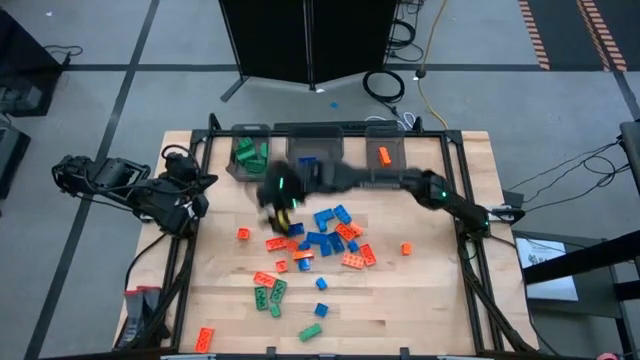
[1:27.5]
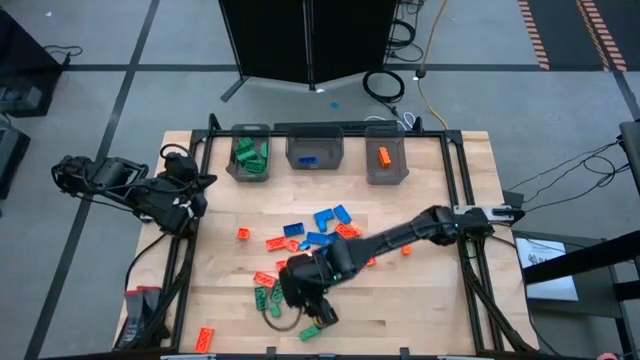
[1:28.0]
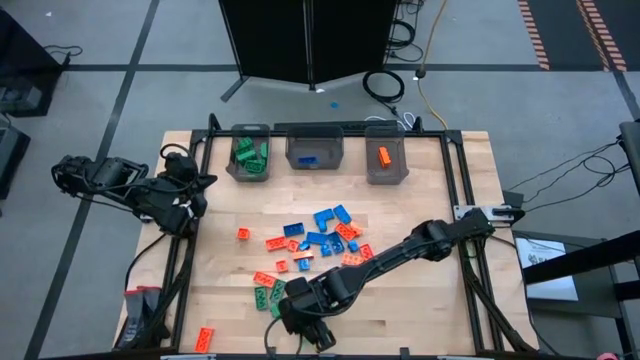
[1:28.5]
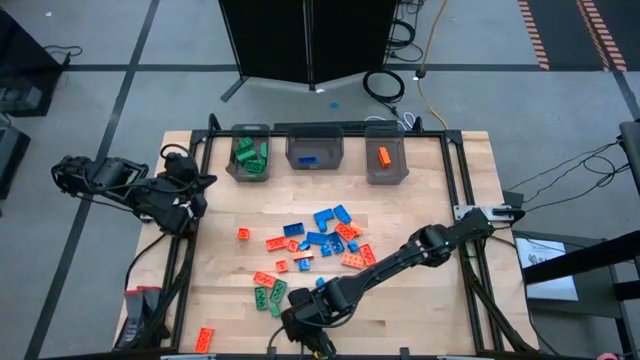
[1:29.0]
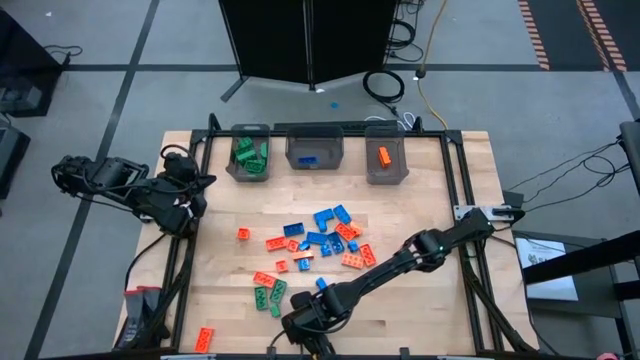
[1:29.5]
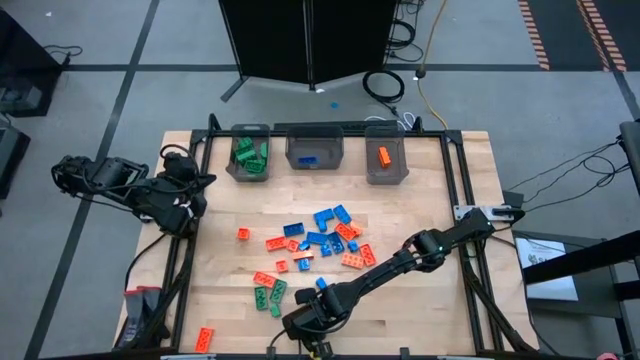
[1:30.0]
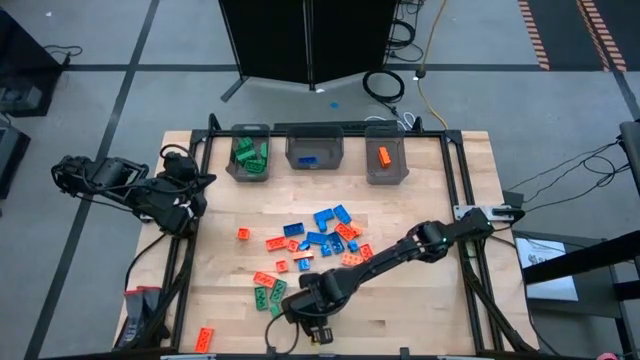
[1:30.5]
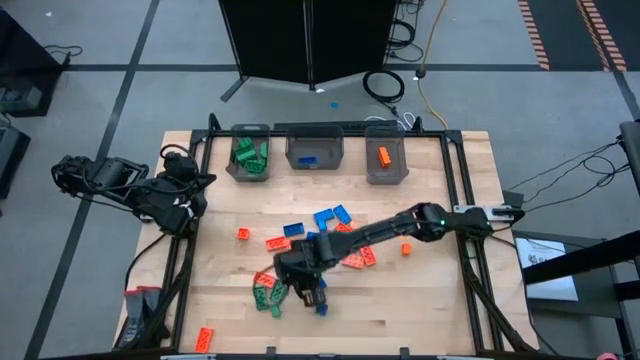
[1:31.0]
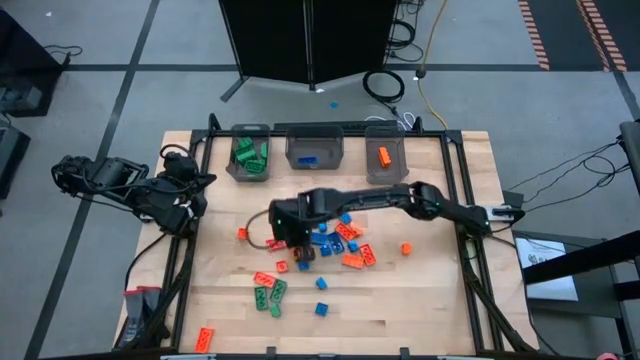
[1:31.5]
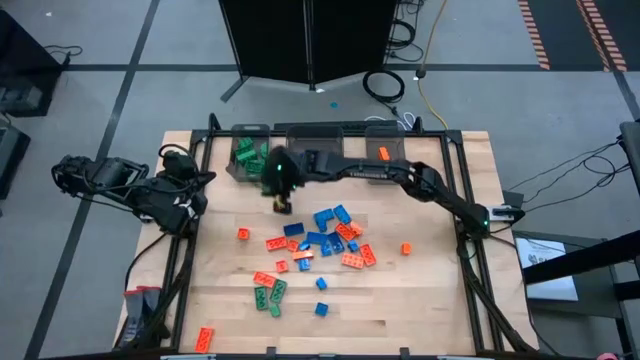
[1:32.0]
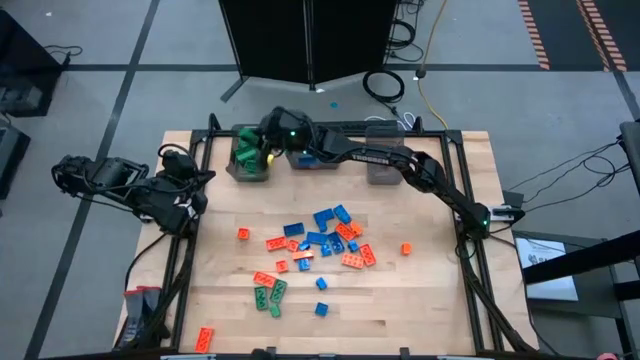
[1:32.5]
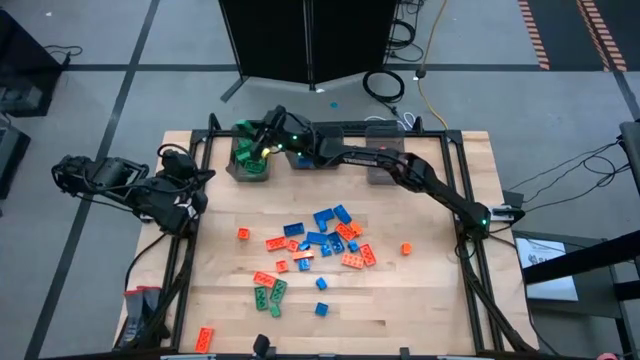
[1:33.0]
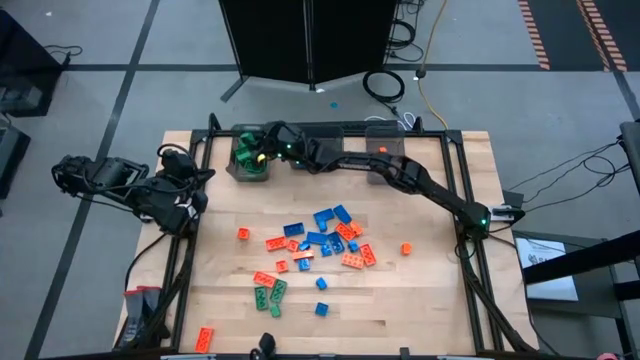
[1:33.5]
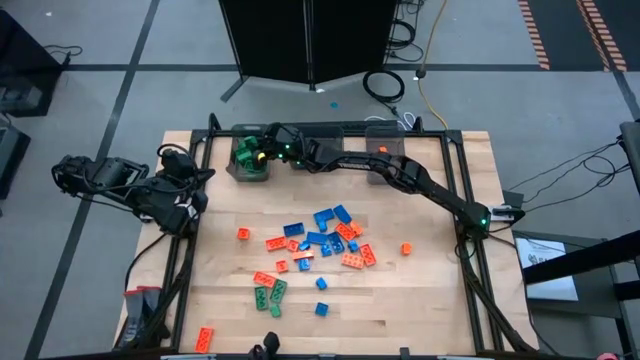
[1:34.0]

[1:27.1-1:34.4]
Task: Sort blocks
Put the green game piece into the left black bin

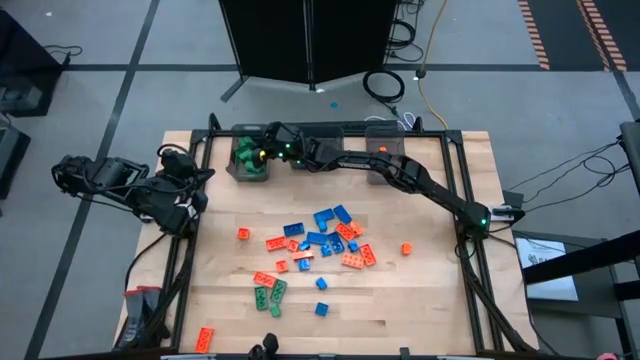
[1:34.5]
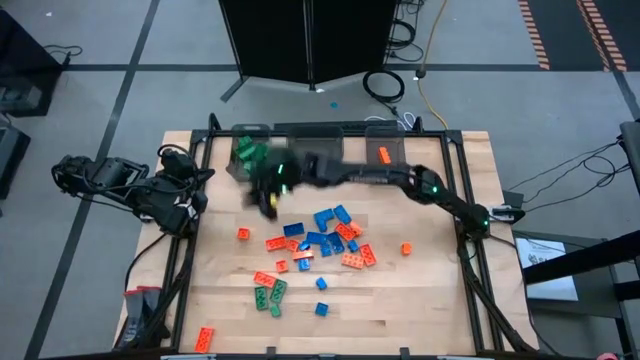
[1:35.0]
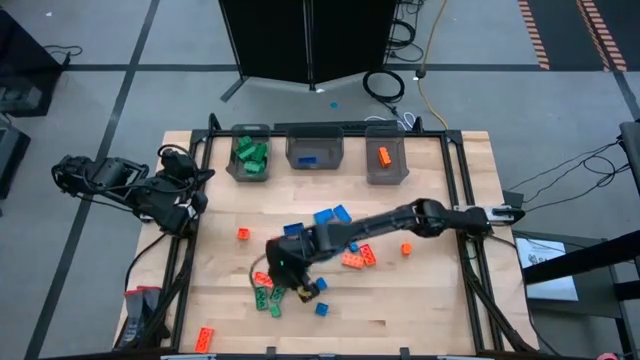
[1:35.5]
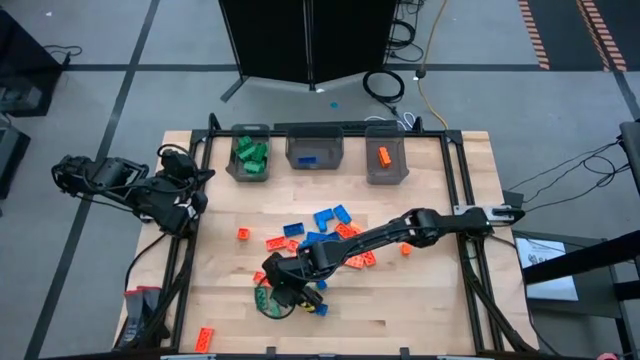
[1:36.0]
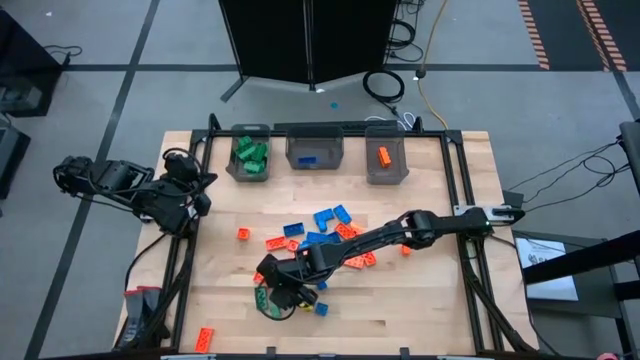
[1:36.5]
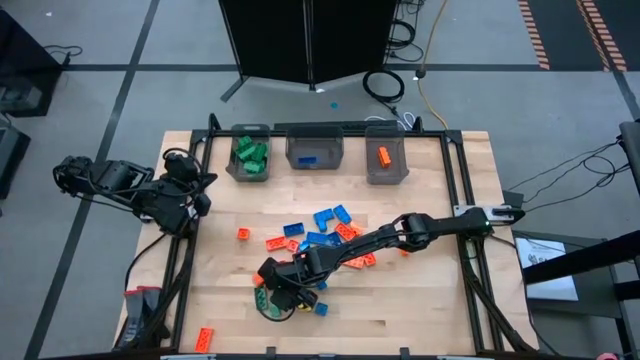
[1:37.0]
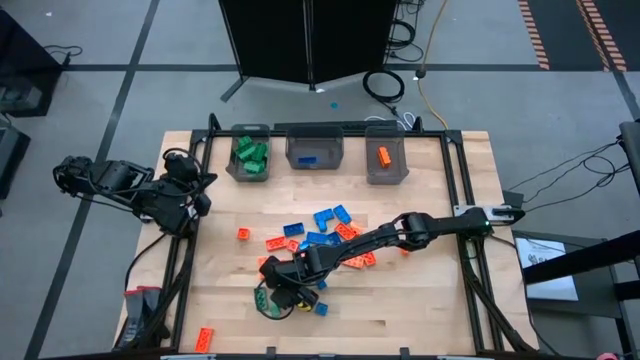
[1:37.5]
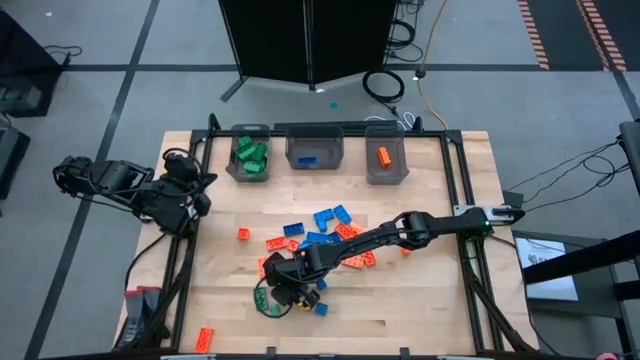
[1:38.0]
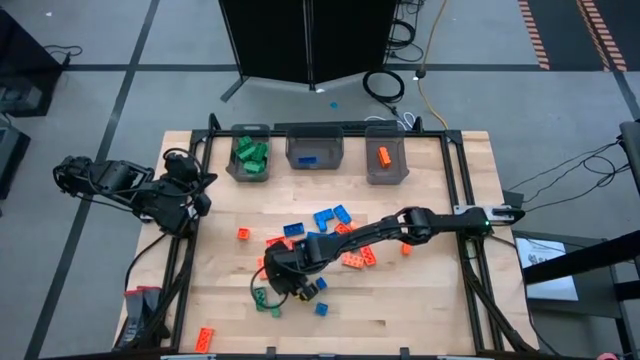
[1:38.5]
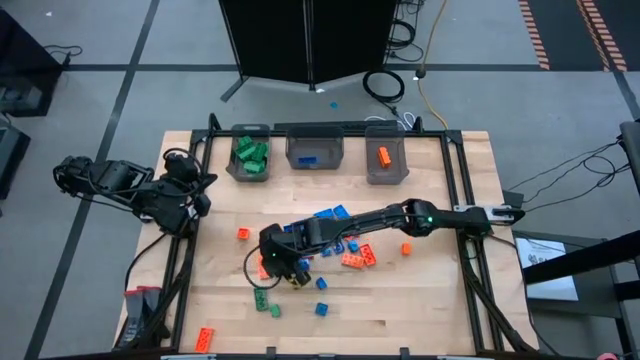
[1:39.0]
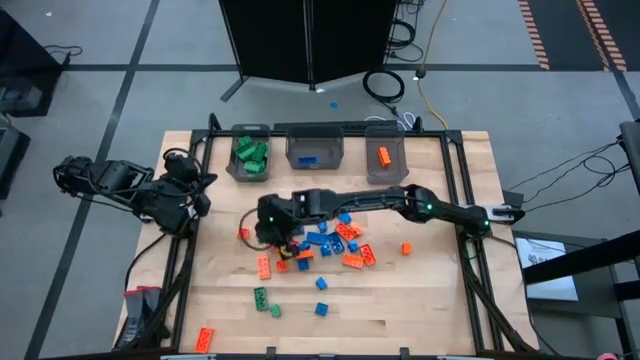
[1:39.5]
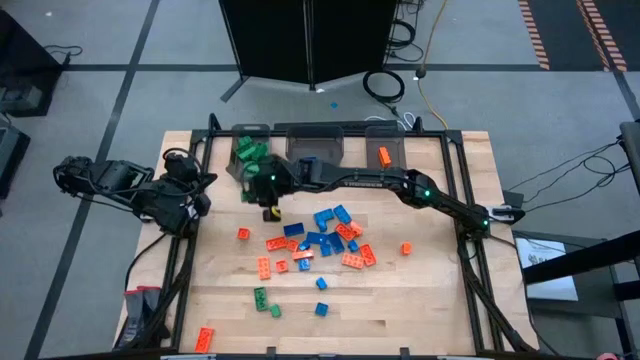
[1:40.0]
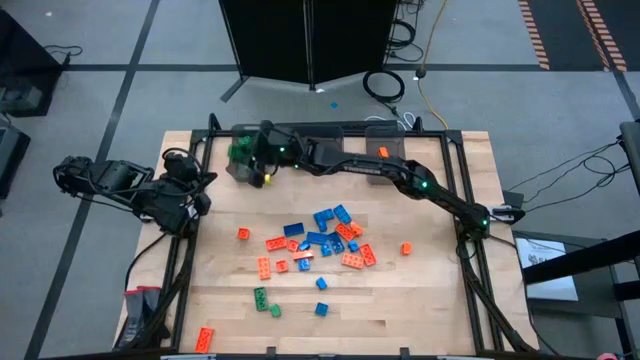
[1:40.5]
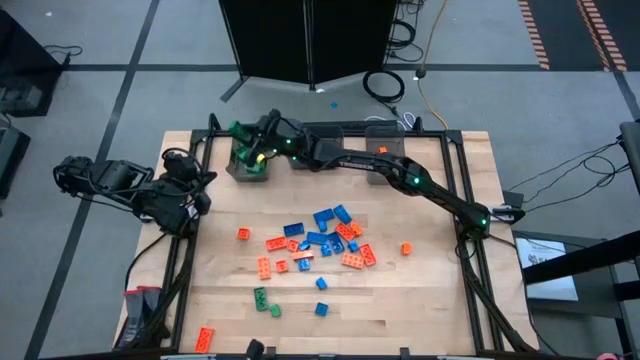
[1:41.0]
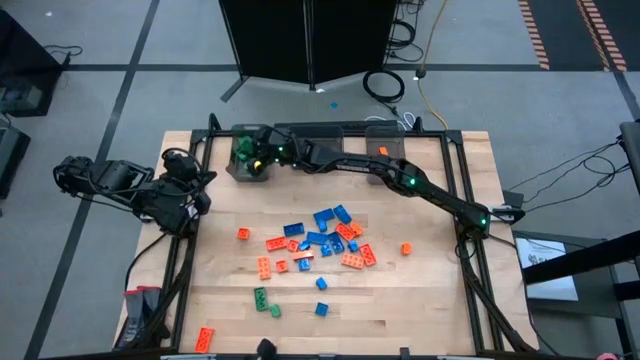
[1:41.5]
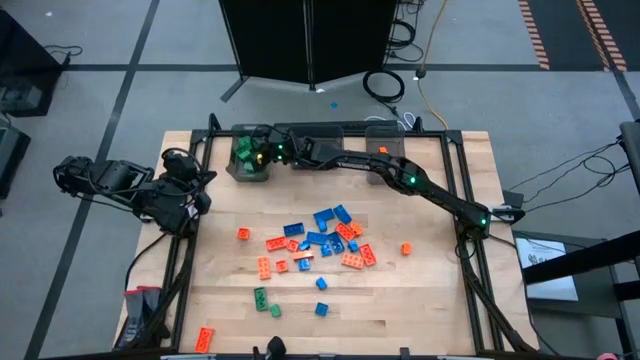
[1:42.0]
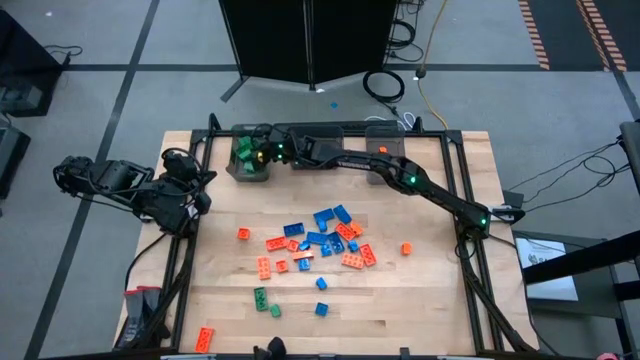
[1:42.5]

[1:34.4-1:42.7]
Put the green game piece into the left black bin

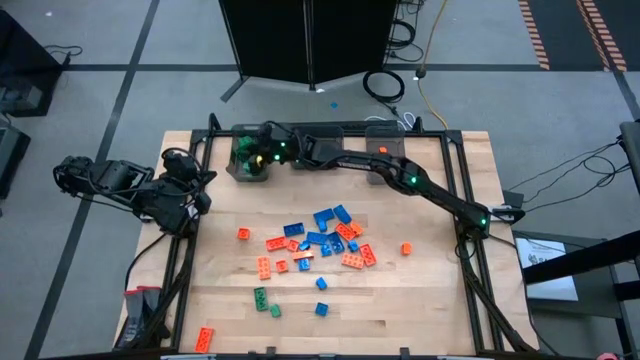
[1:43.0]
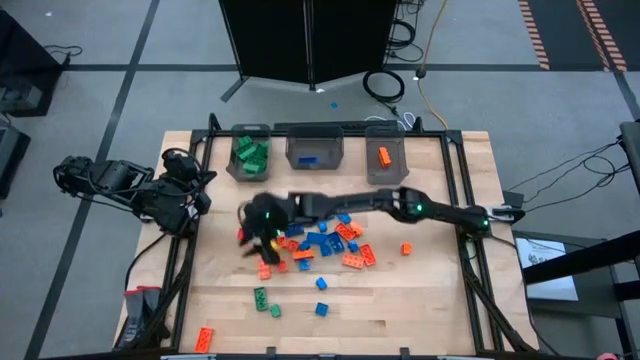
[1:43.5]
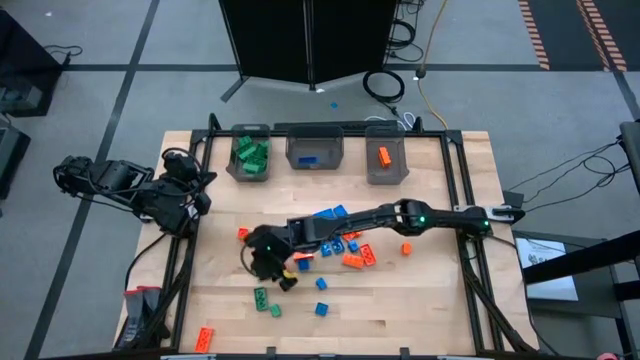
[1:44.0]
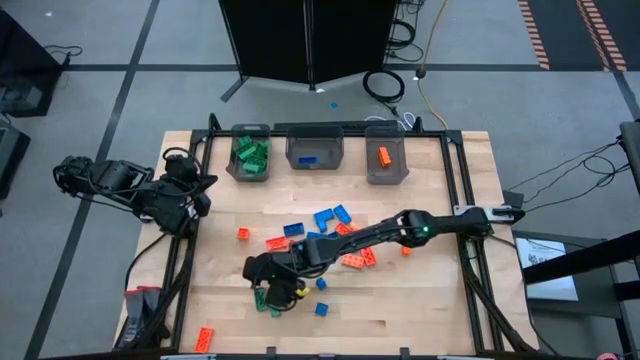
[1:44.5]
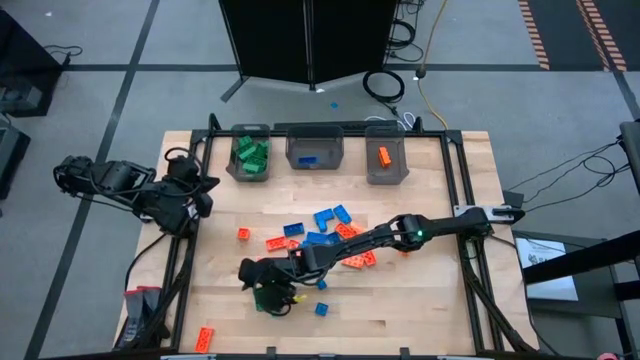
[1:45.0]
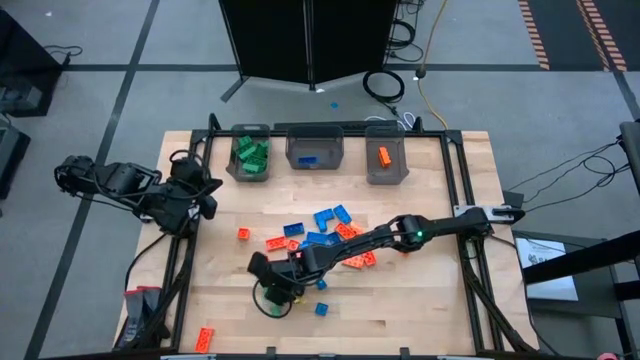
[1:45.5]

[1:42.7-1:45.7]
Put the green game piece into the left black bin

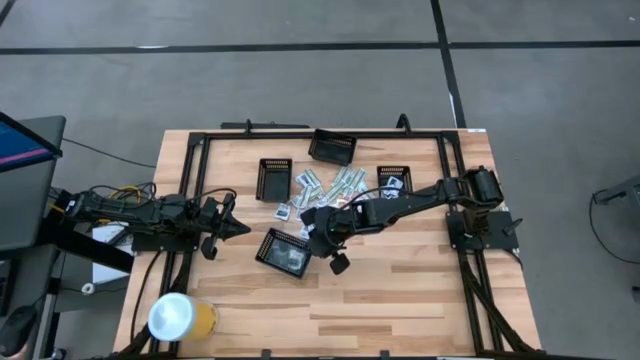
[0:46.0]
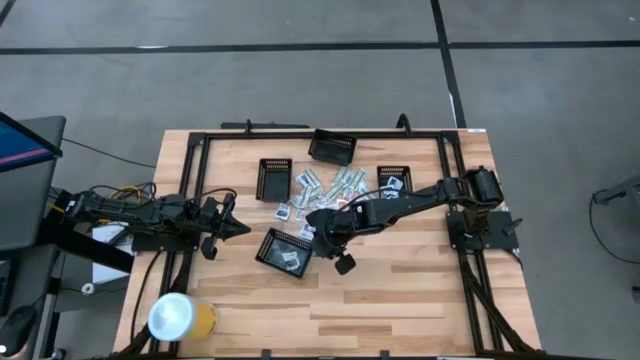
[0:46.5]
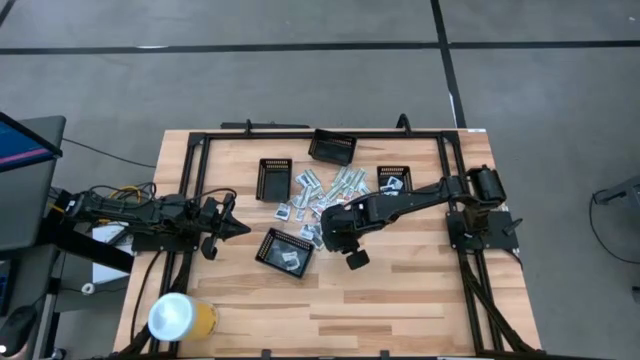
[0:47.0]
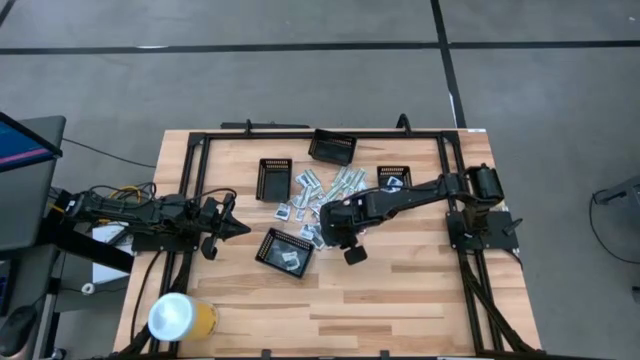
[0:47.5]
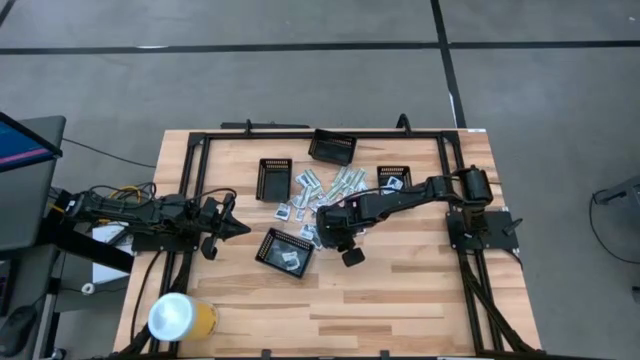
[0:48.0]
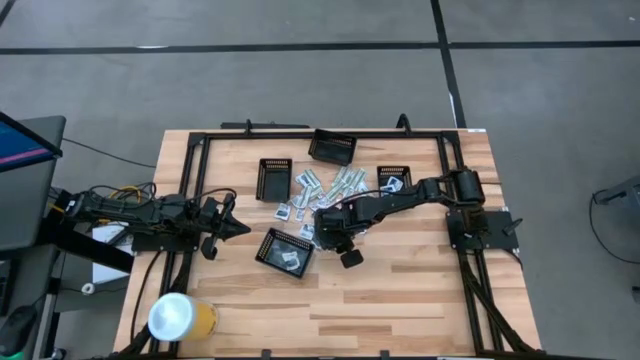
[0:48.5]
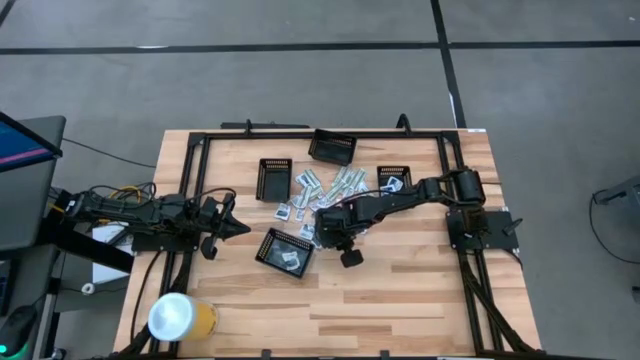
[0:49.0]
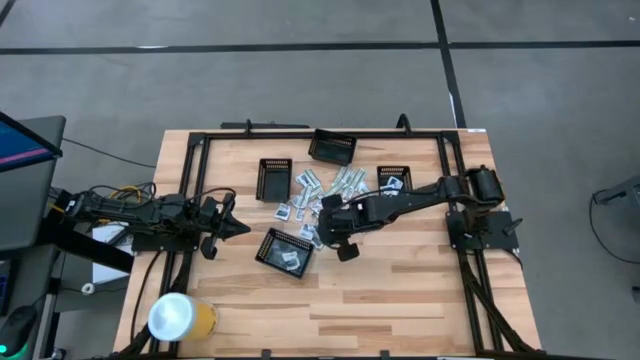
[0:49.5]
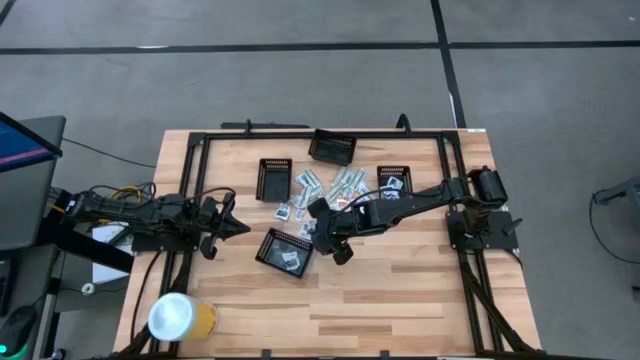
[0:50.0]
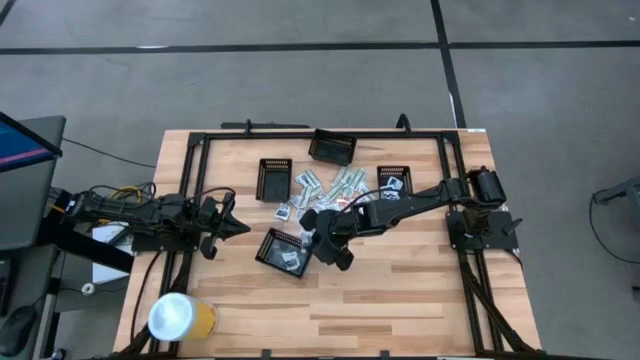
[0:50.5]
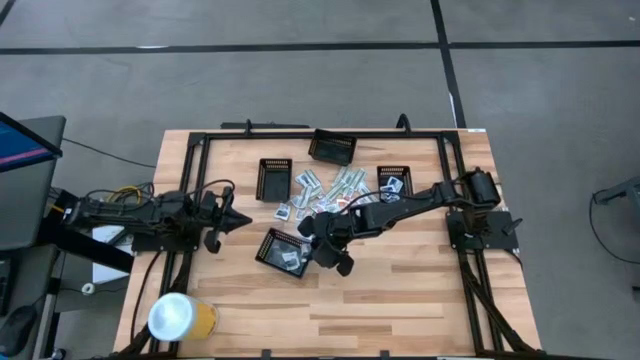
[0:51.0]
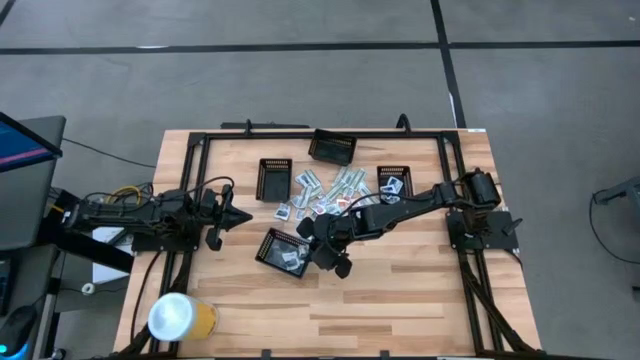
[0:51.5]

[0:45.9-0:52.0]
Task: Pick & Place First Aid Supplies
Put the white towelette pack into the bottom black bin
